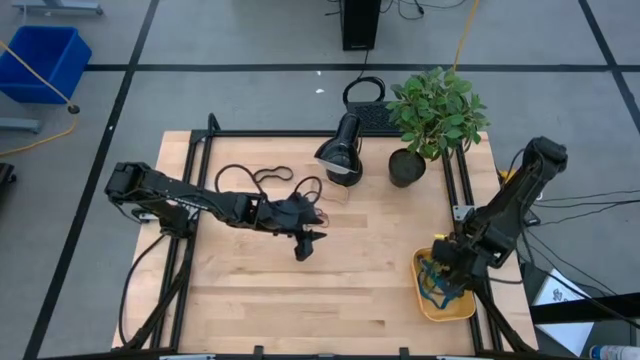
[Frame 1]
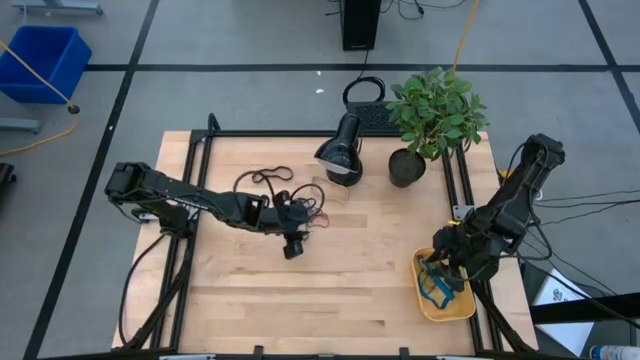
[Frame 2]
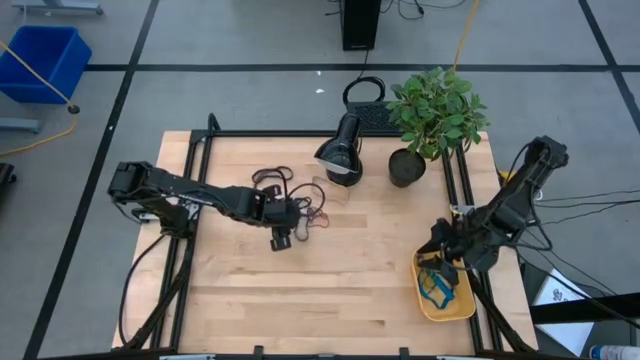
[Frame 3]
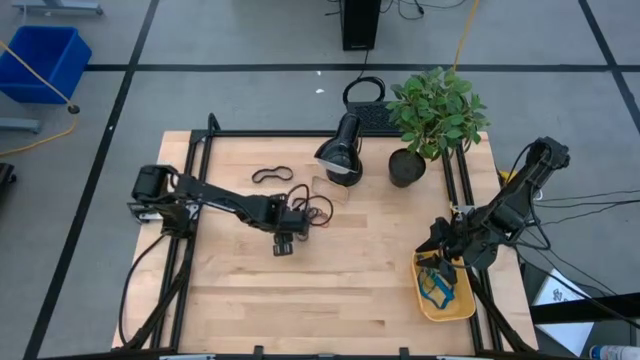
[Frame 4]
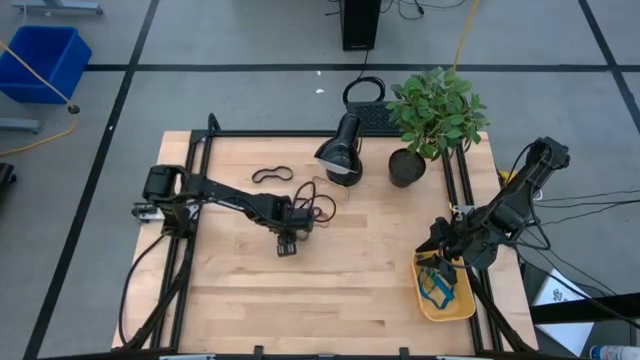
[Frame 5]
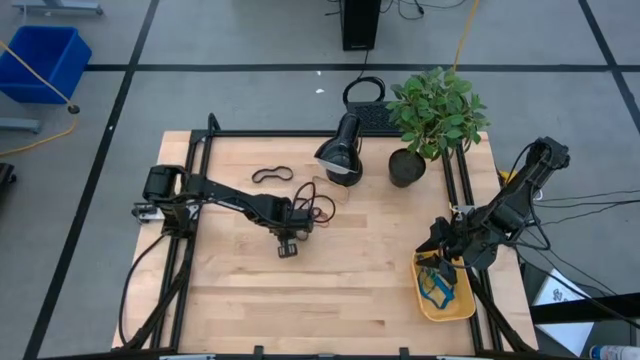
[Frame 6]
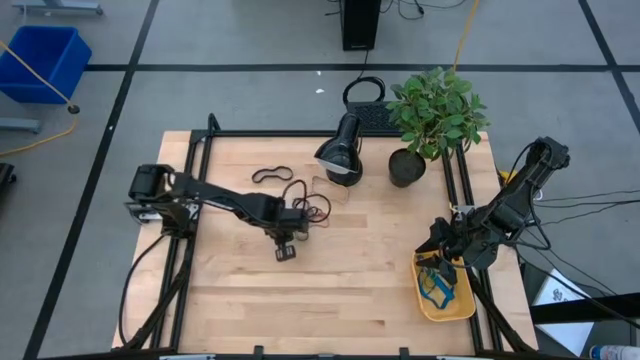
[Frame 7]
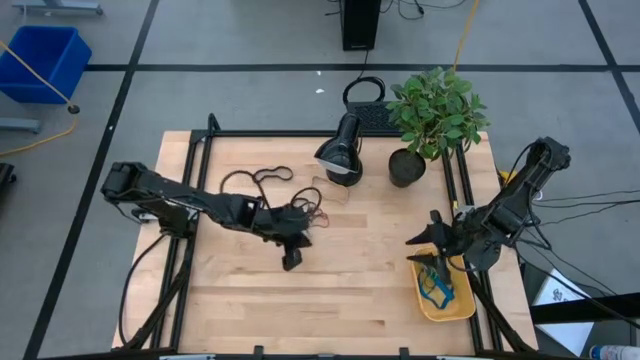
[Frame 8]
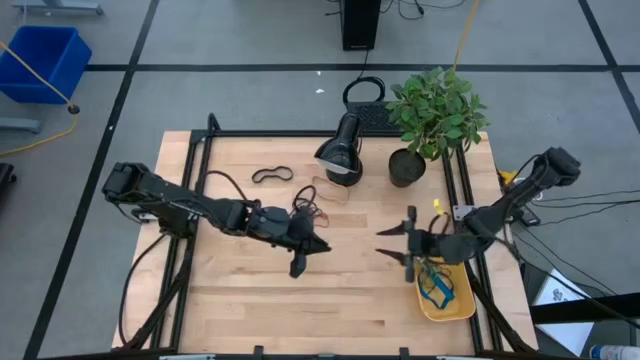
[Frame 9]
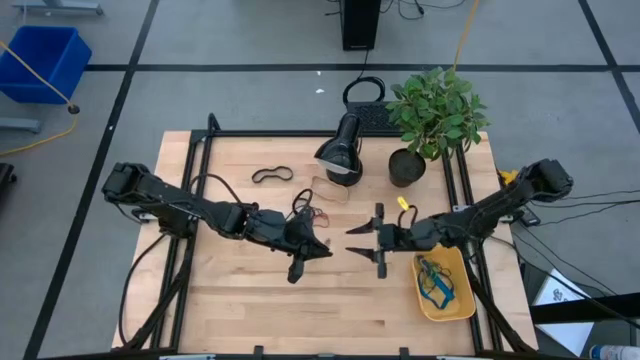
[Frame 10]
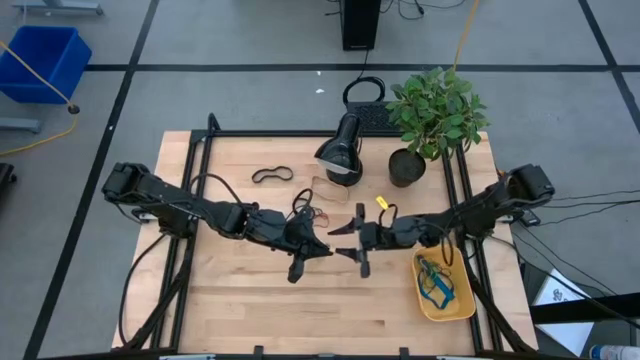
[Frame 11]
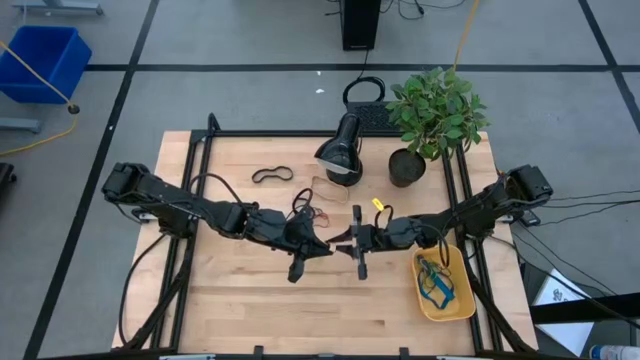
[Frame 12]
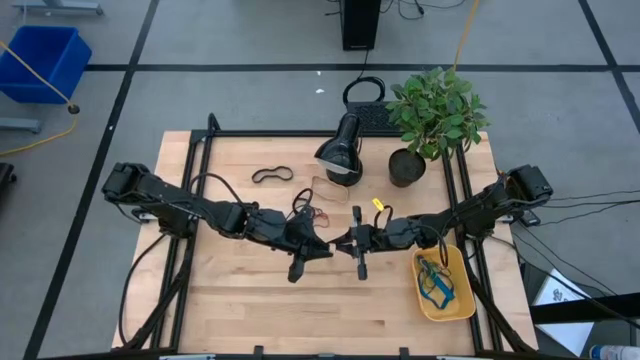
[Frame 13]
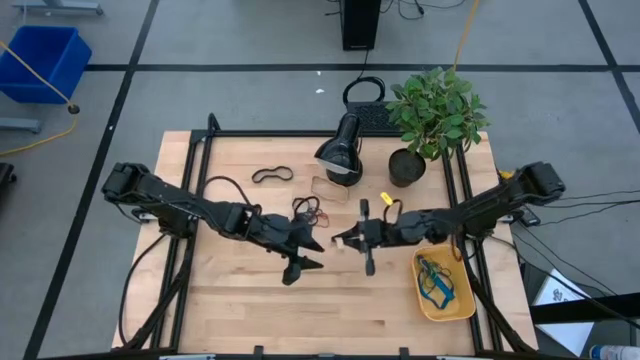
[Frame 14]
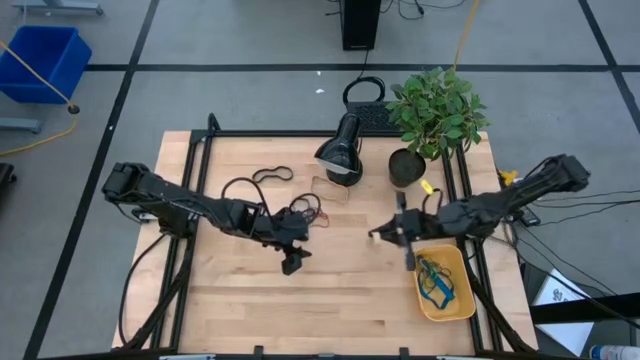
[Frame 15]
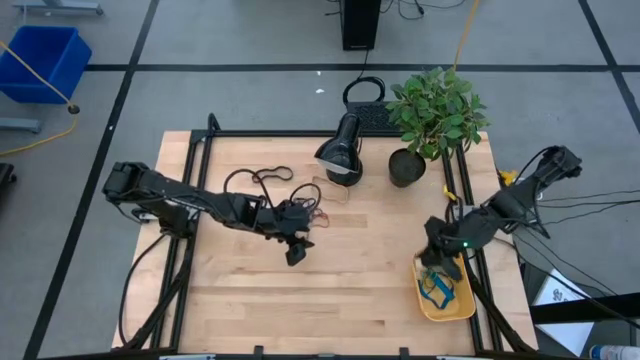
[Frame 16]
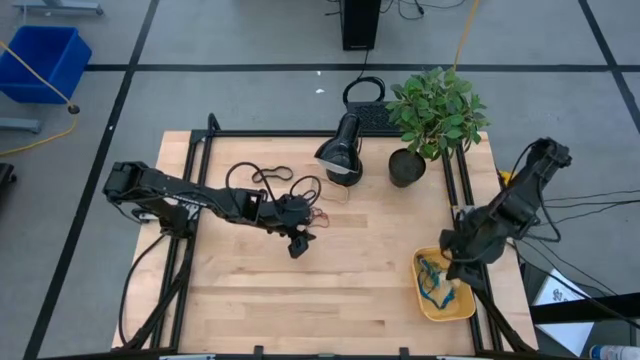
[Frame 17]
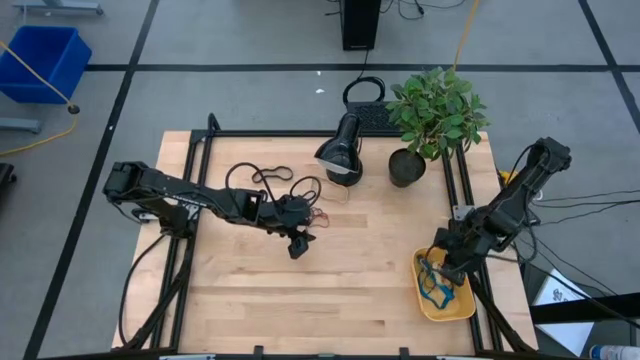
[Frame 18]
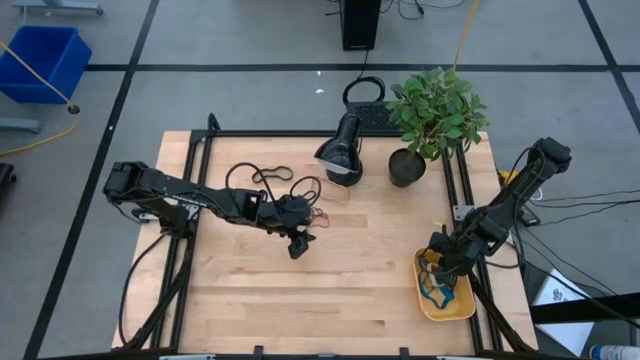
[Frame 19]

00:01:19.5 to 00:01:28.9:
Task: Pick and place rubber bands into bin
Put the brown rubber band into the yellow bin

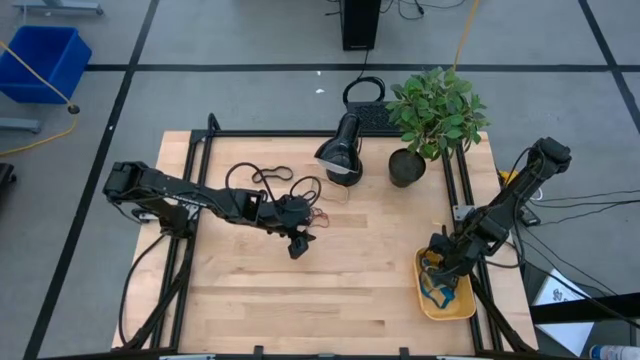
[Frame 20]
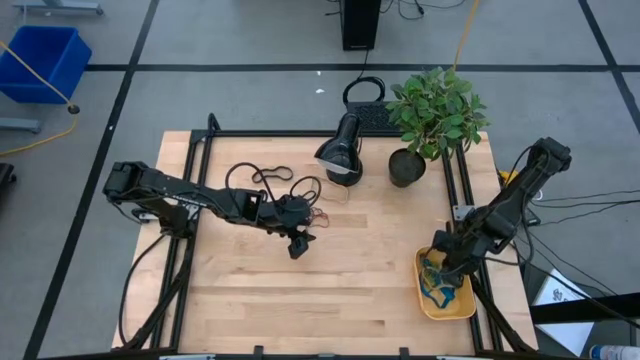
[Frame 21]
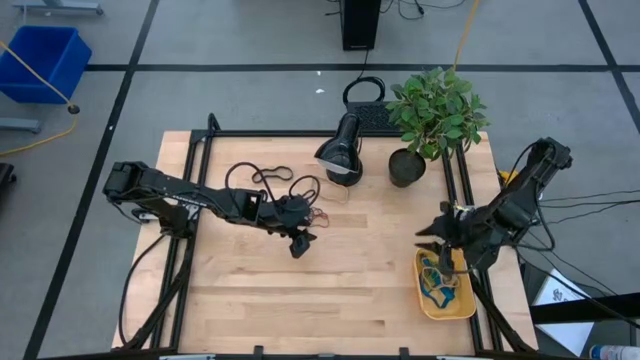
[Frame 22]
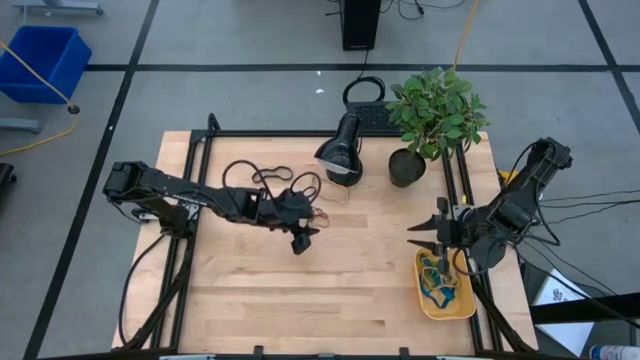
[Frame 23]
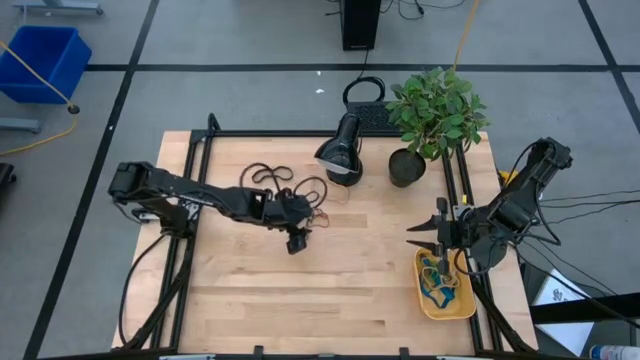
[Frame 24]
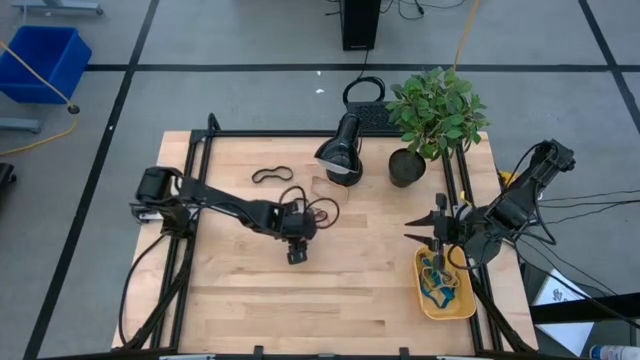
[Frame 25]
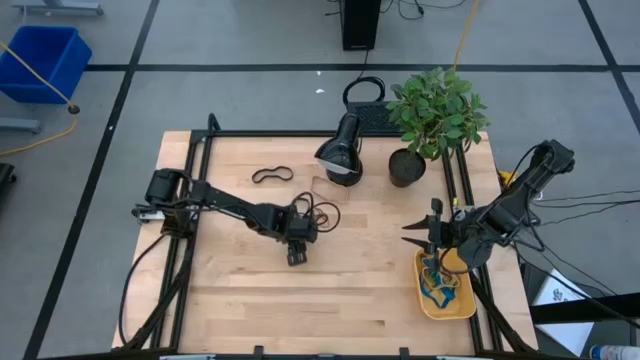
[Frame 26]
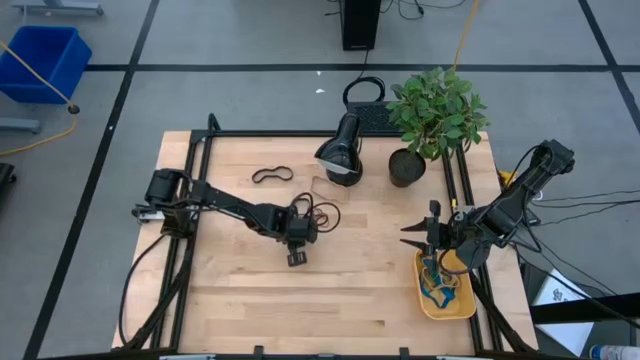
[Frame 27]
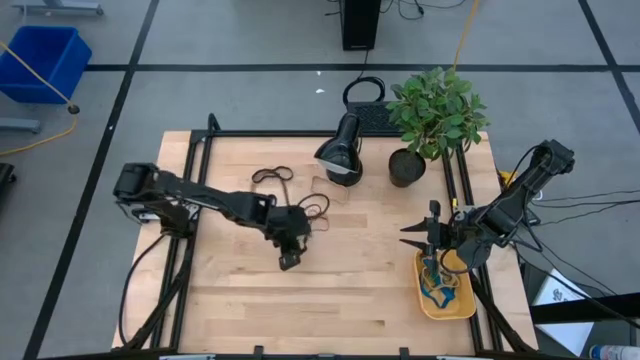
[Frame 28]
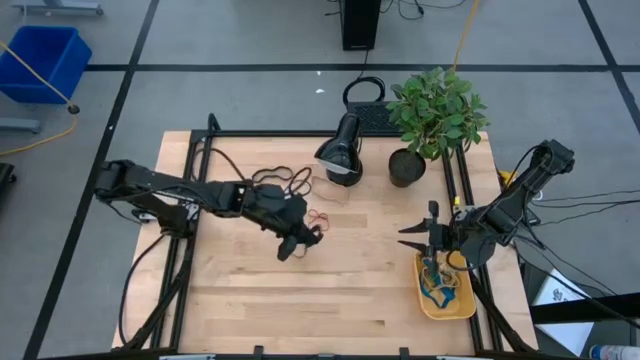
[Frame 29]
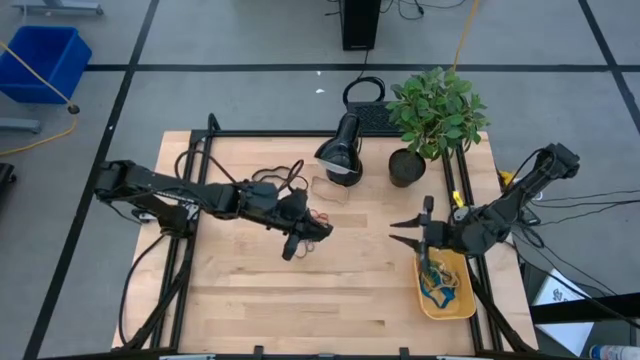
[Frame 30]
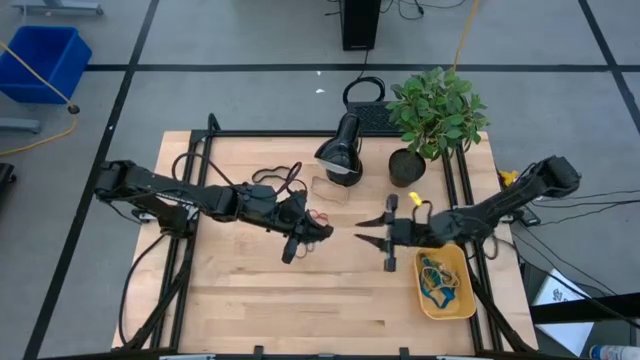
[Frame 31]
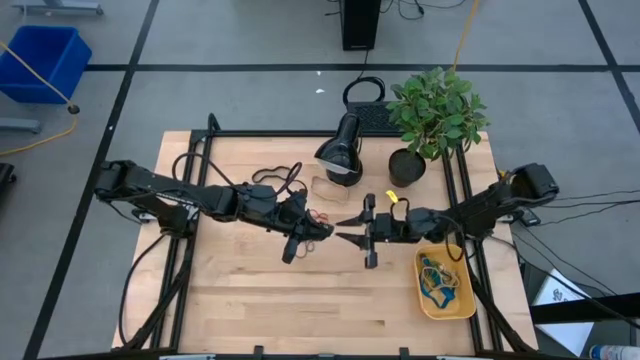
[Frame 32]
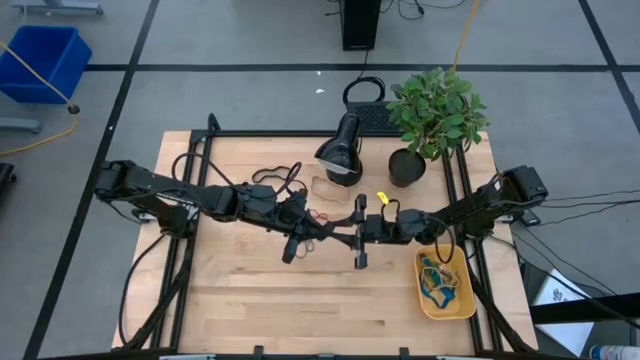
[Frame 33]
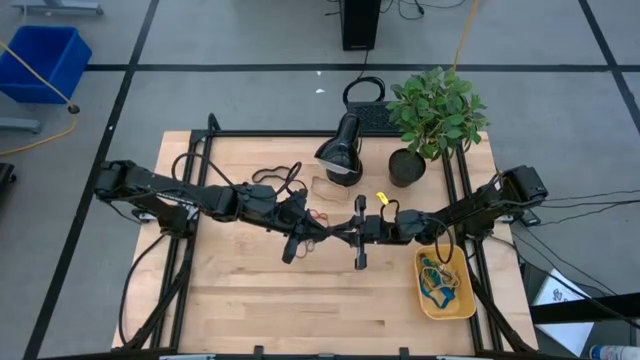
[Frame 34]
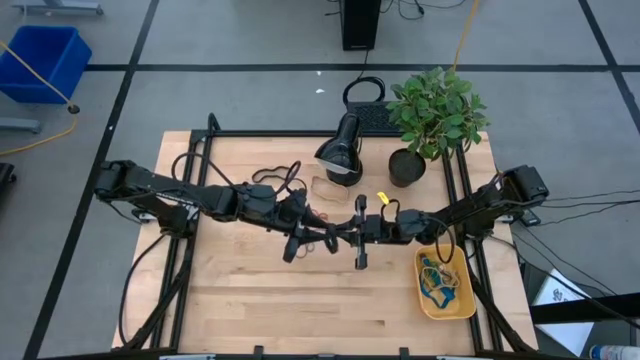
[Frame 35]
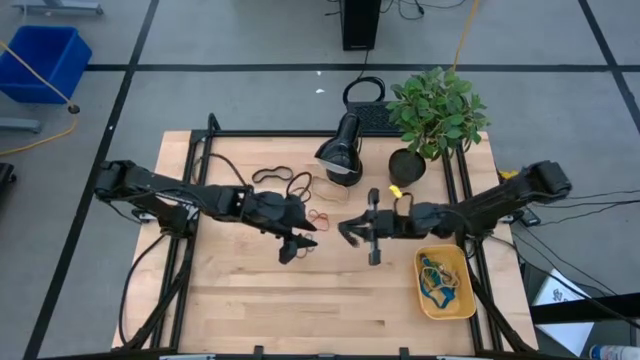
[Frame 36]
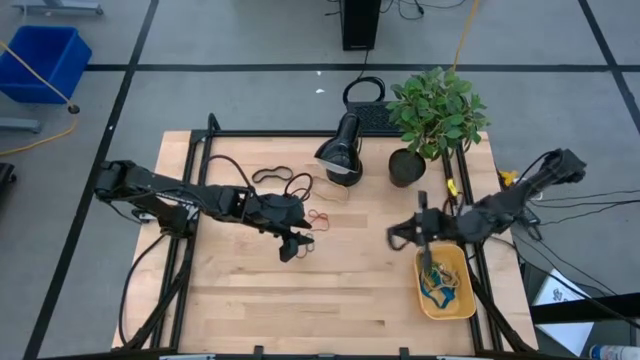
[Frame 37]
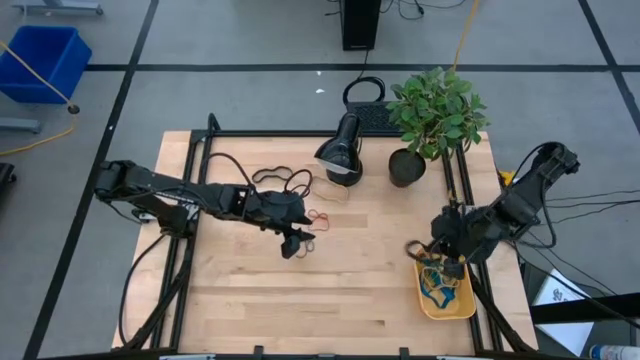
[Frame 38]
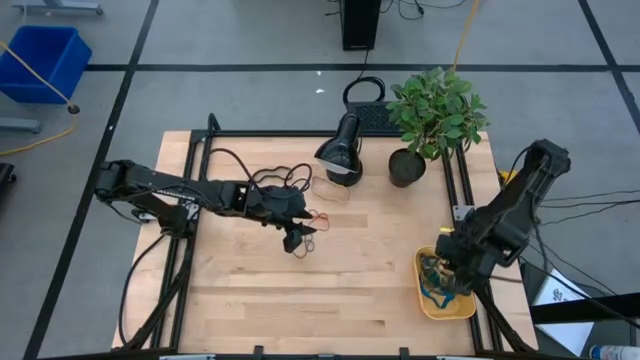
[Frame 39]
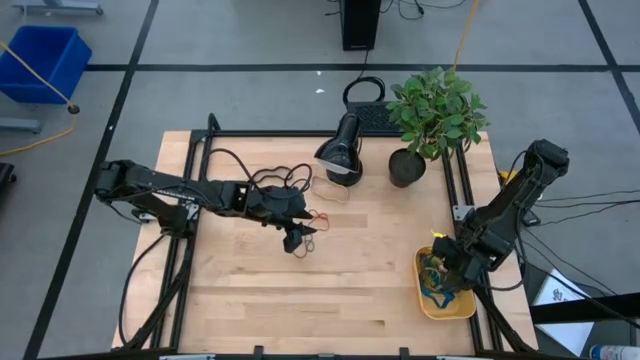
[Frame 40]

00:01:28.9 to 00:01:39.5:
Put the black rubber band into the yellow bin

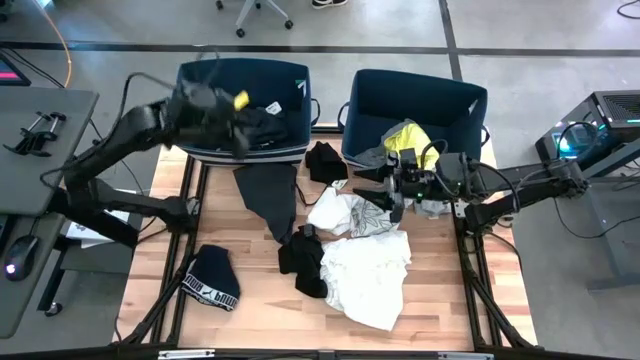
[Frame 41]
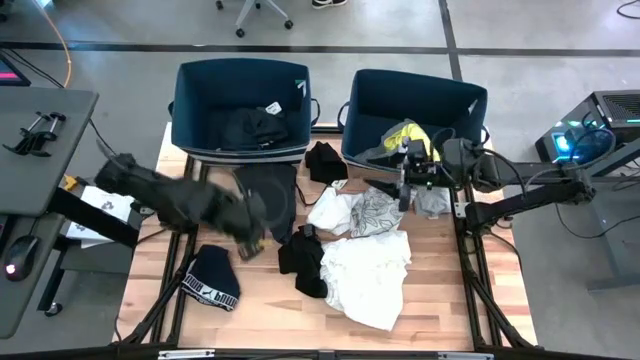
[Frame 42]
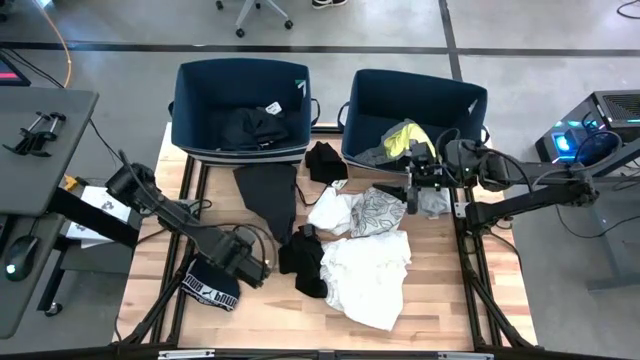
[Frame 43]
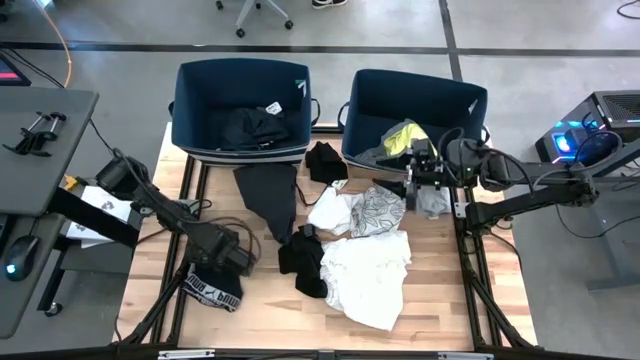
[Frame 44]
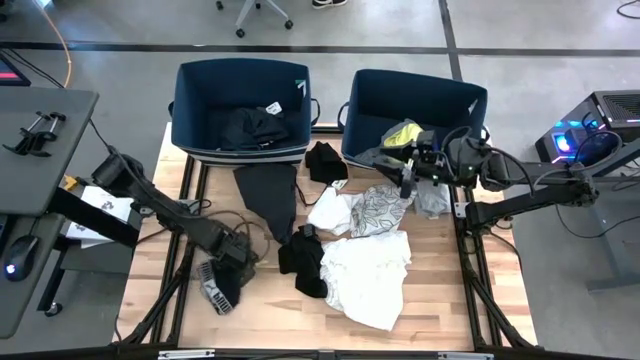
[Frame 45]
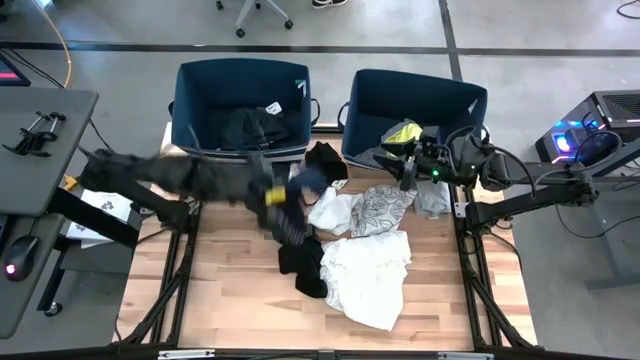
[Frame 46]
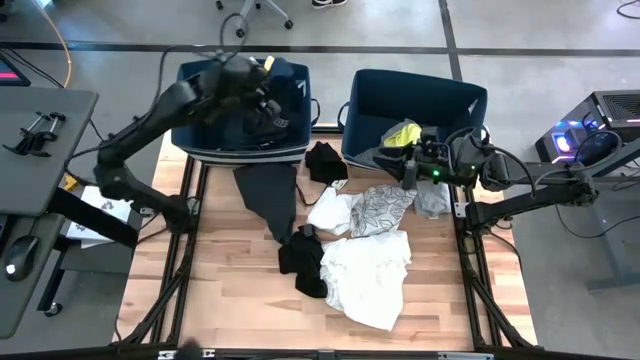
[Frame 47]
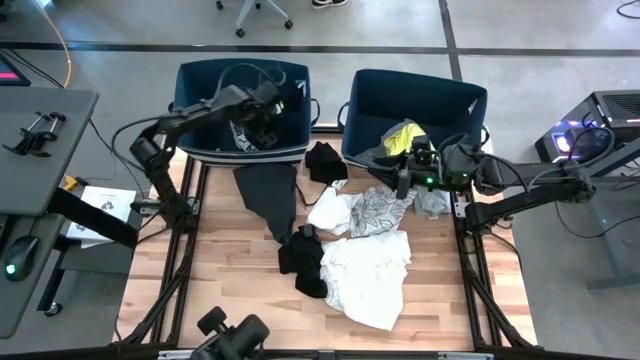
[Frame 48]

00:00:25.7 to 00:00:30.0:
Task: Sort clothes
Put the blue underwear into the left laundry bin
